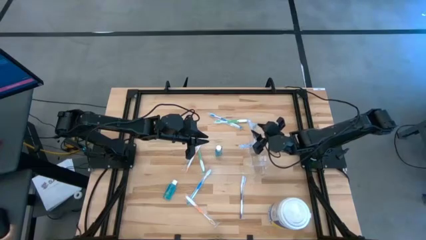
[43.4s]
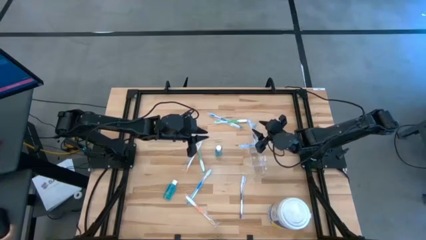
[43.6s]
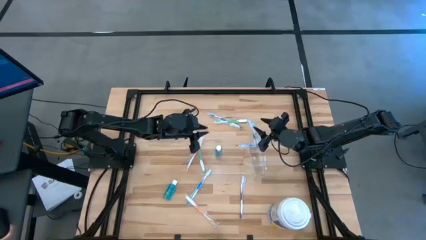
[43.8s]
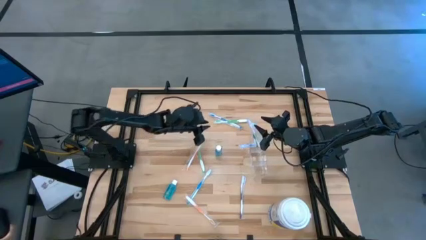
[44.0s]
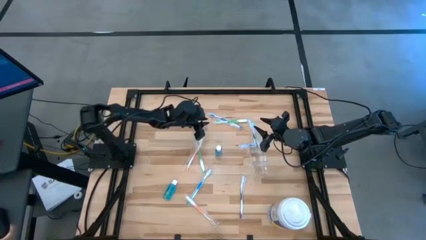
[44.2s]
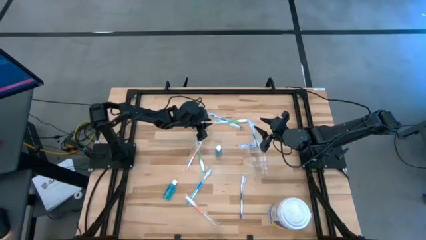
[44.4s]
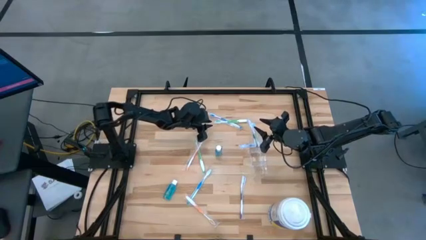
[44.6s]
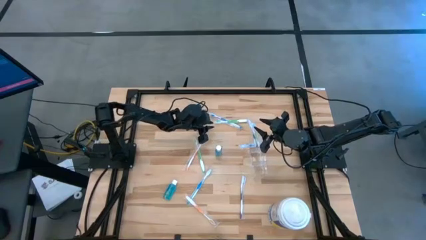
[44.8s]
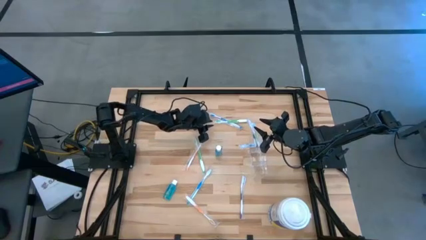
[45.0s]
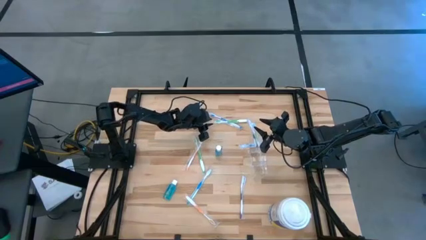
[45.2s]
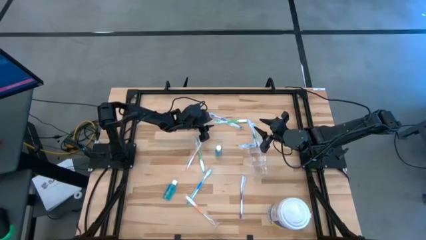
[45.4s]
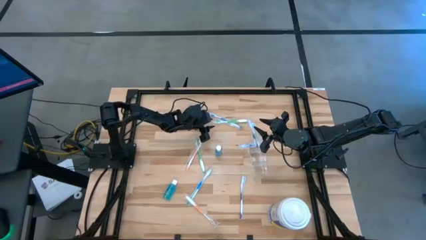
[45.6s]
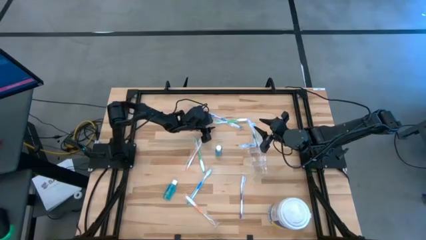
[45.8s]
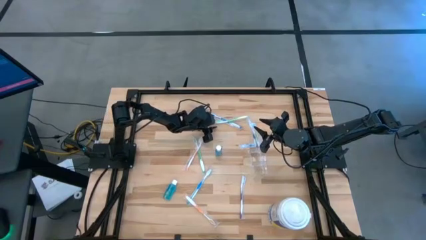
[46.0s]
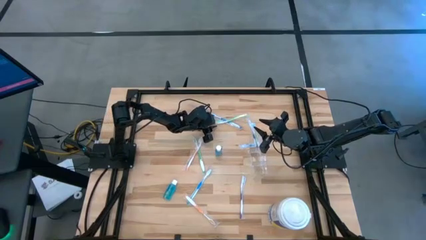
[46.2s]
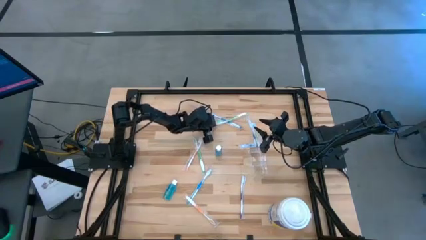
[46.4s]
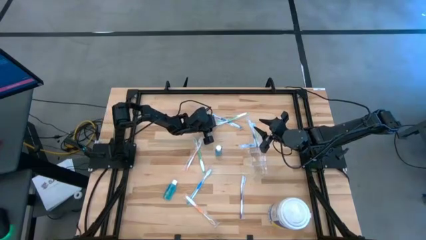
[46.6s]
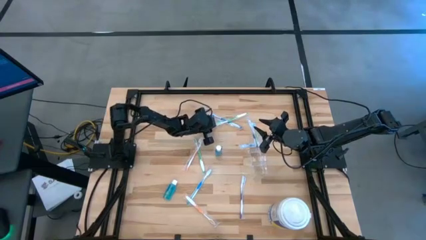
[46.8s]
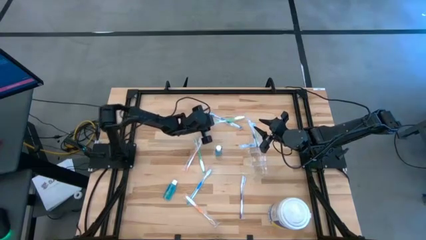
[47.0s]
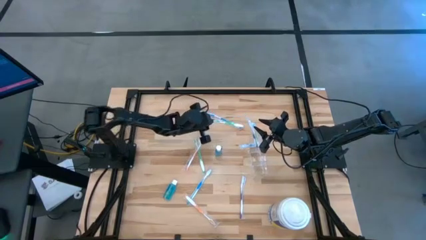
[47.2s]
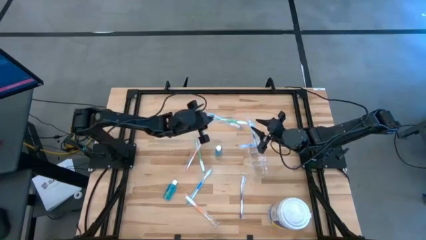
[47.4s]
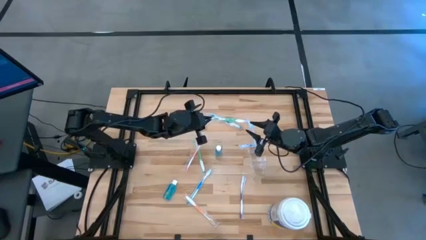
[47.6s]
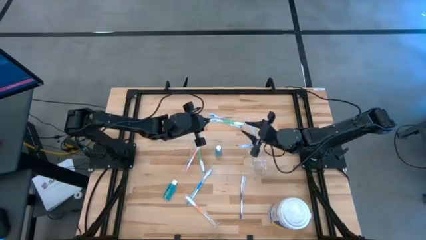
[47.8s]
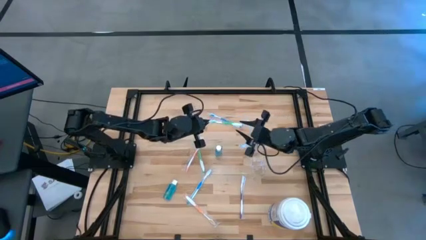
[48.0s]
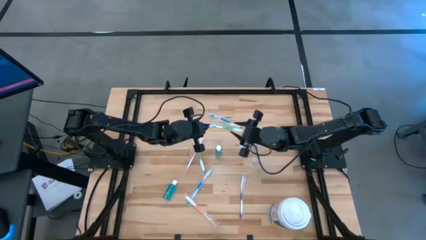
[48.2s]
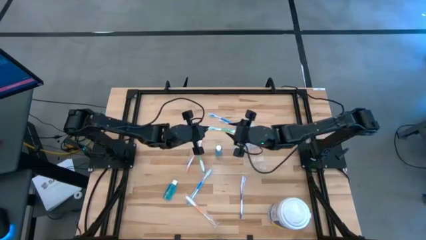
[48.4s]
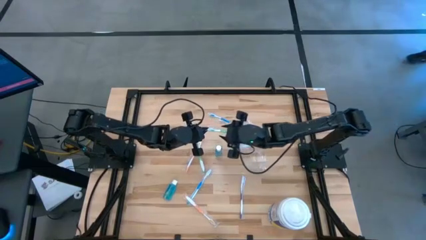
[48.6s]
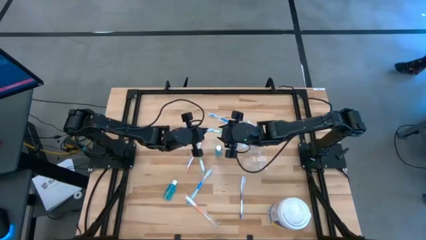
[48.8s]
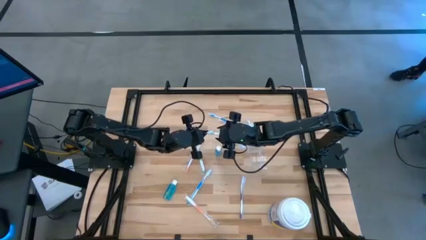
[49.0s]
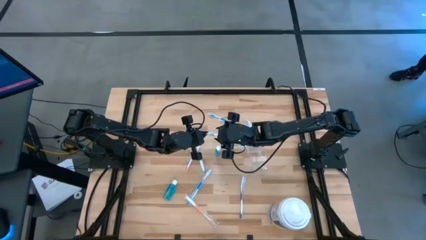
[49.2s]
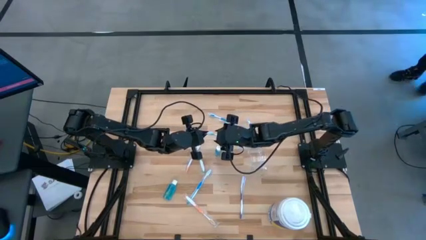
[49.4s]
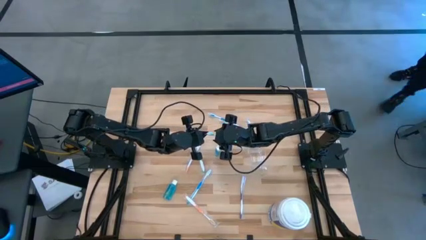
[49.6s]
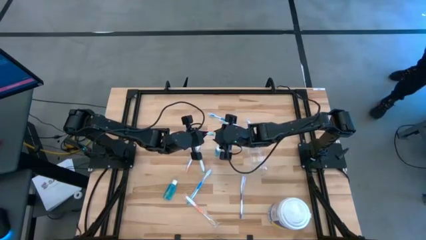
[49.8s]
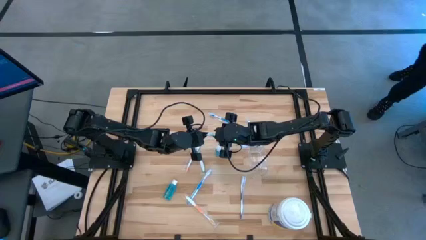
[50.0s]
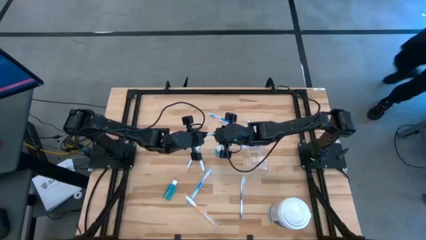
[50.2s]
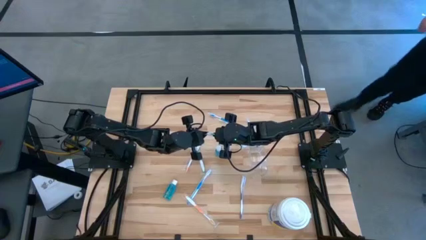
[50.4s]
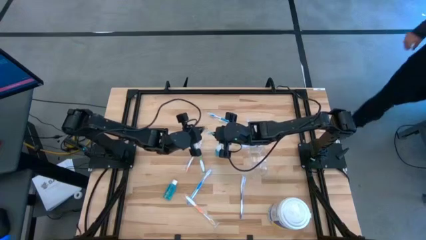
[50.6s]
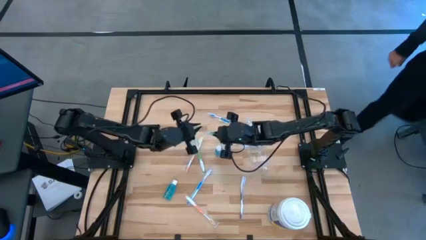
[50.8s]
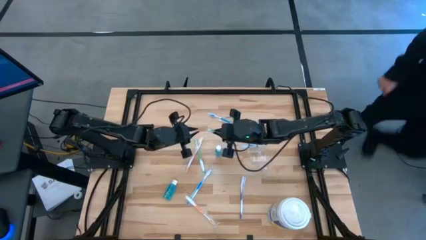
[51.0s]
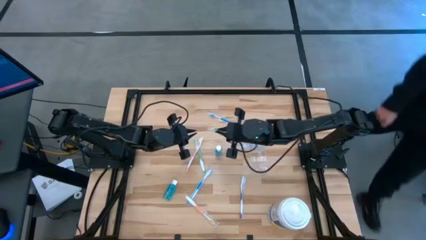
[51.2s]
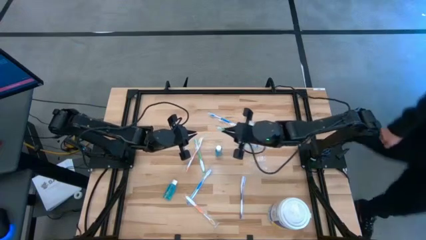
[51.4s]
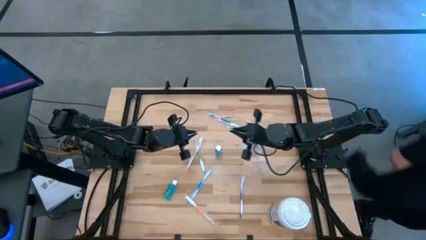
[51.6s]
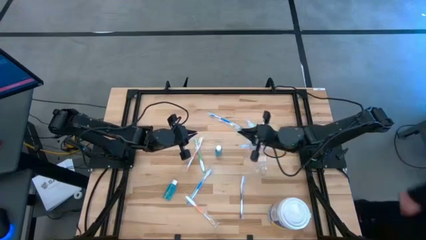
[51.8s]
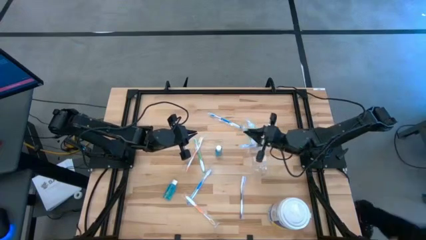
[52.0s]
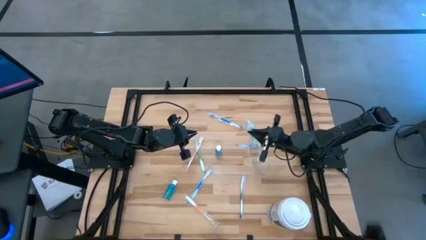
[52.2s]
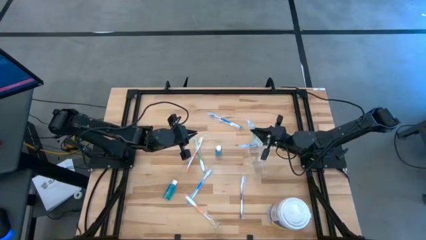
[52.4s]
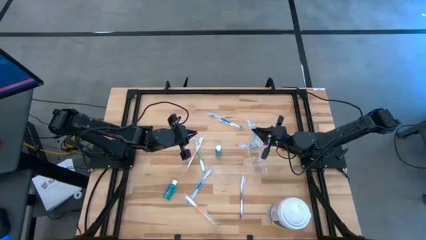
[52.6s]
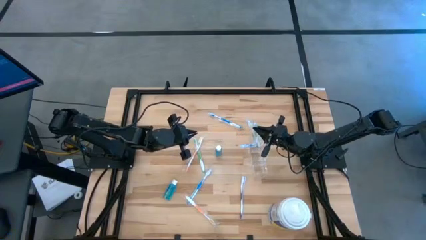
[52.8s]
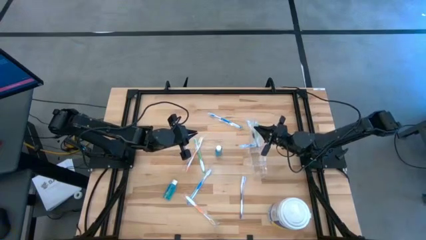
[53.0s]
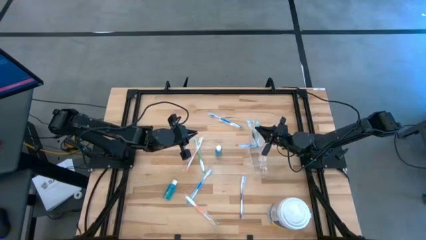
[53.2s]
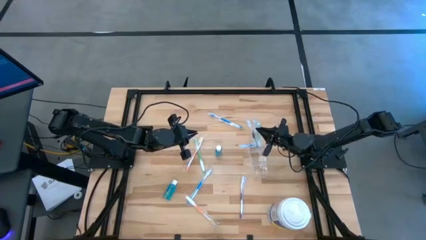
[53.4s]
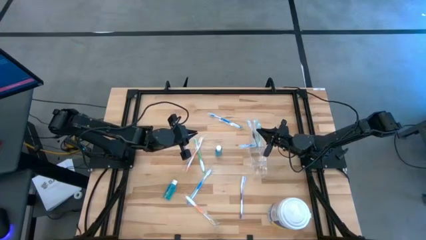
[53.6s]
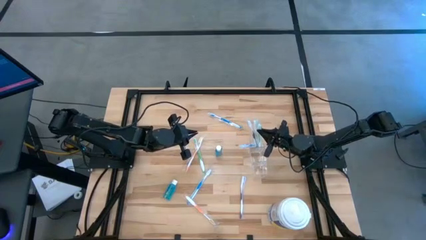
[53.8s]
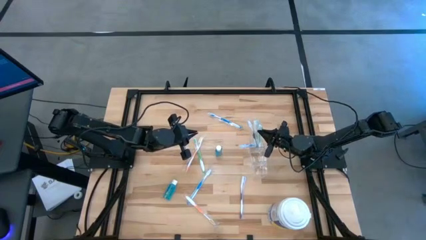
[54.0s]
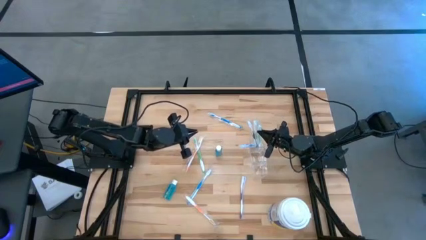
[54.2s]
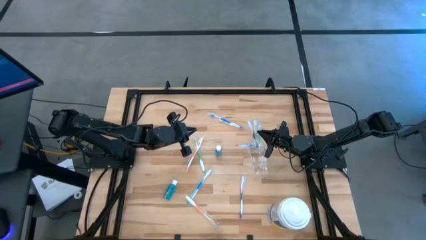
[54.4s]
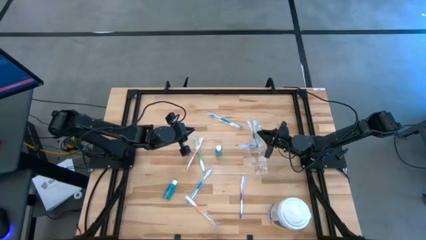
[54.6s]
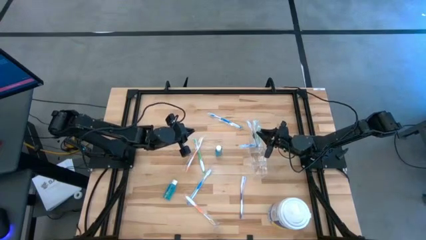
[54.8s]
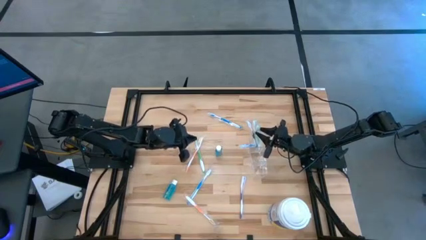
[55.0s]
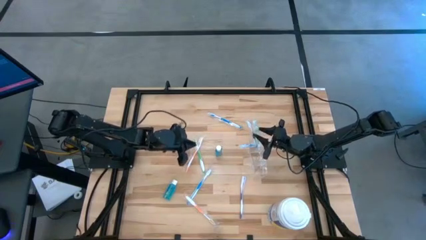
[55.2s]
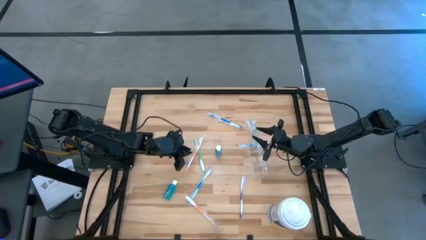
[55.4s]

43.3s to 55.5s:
Task: Pick & Place toothbrushing station
Put the top green toothbrush into the transparent organizer
